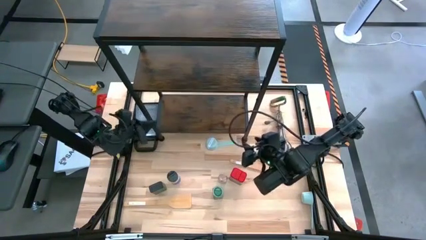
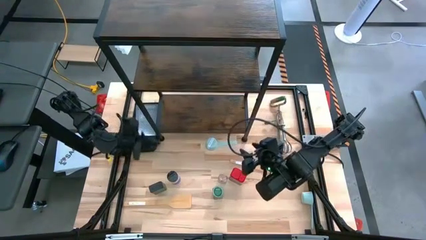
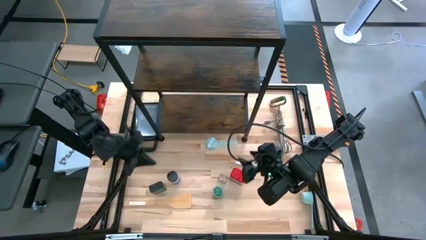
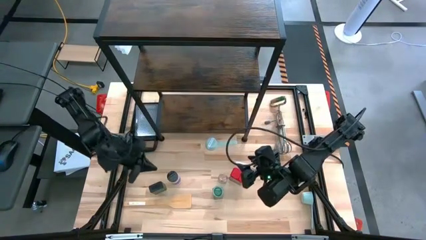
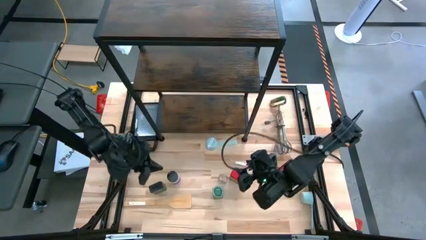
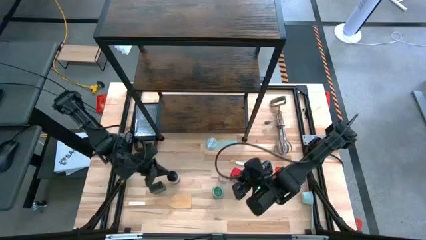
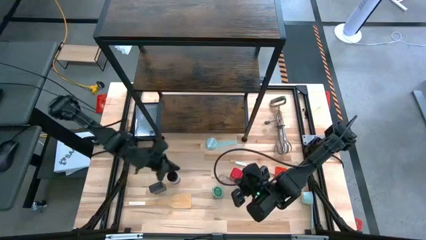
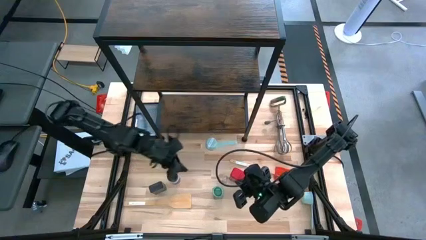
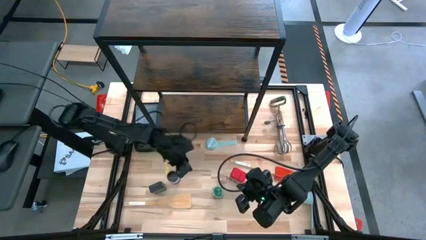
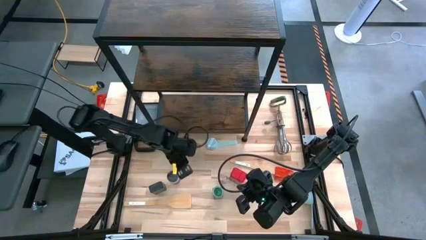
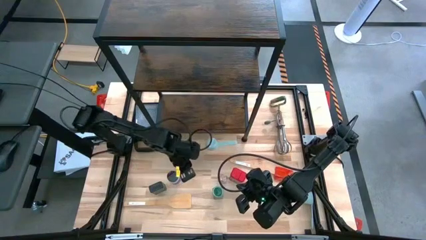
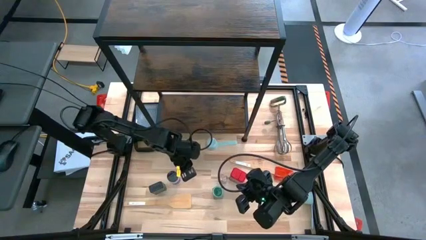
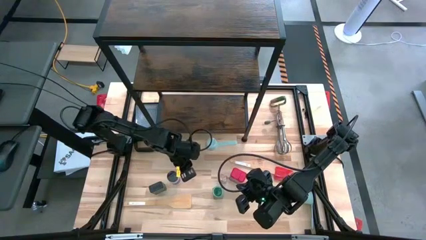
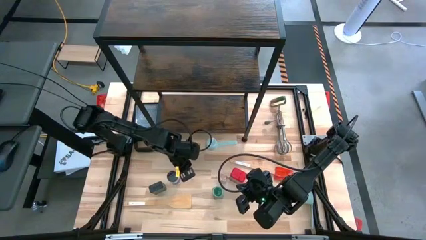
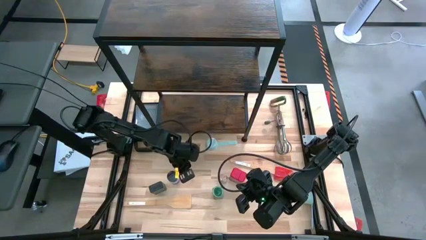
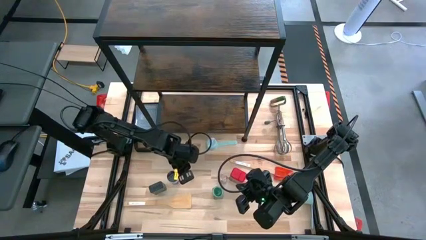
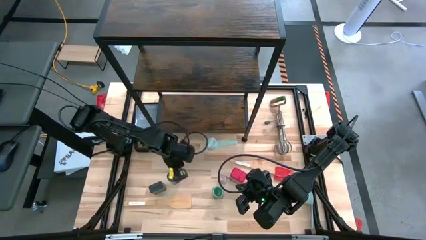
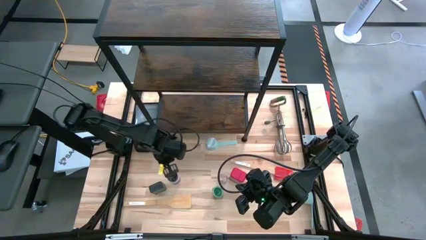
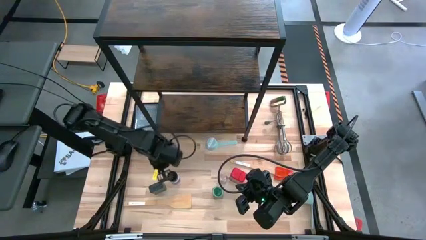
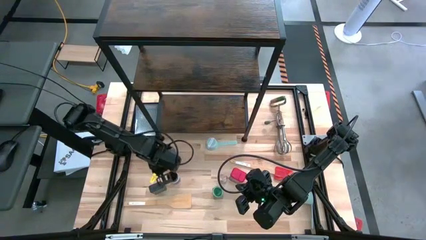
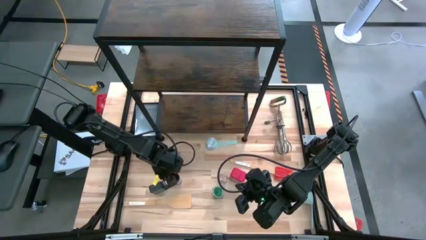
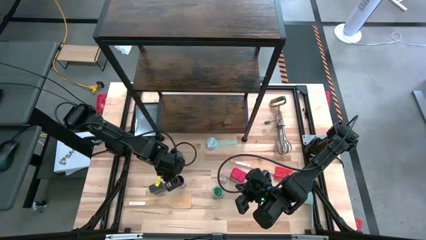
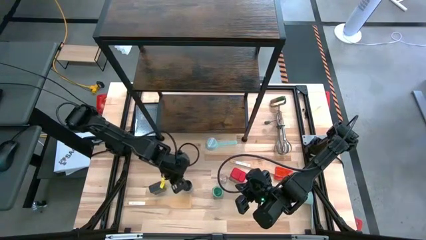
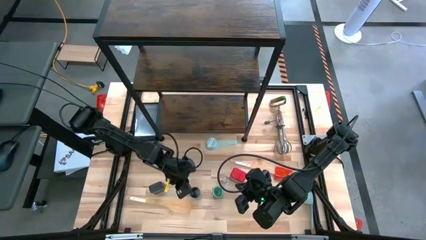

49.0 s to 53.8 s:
Task: Shelf spices
Move the purple seasoning bottle to the bottom center of the table

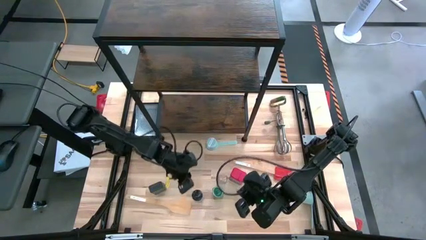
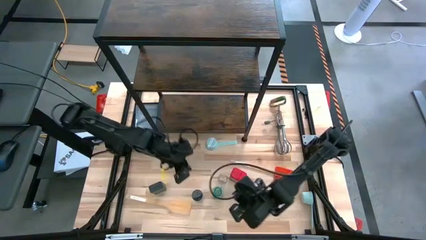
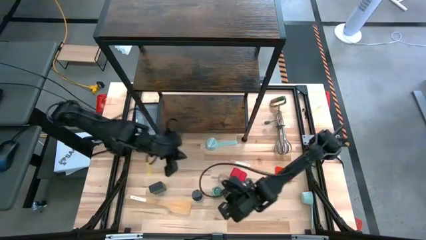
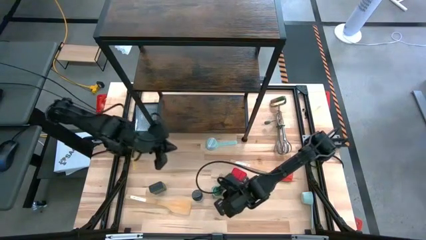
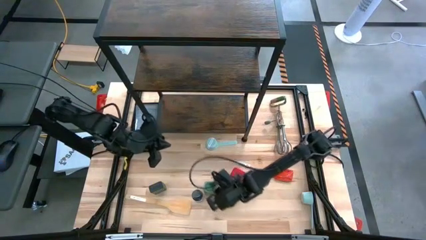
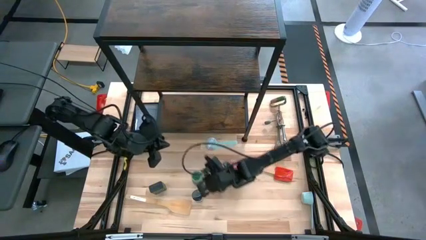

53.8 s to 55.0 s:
Move the green seasoning bottle to the center of the table

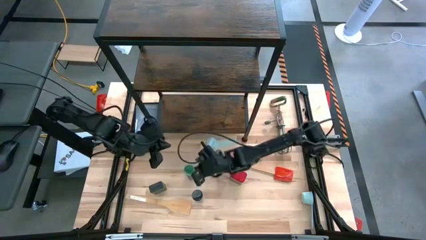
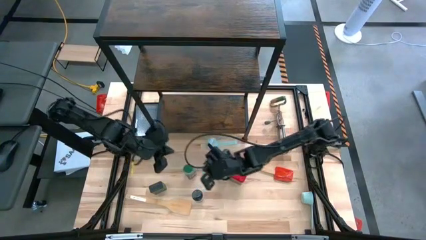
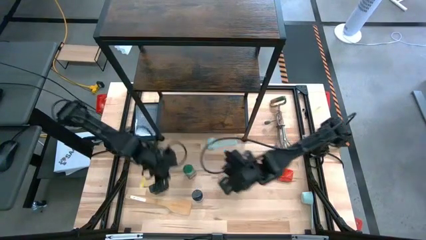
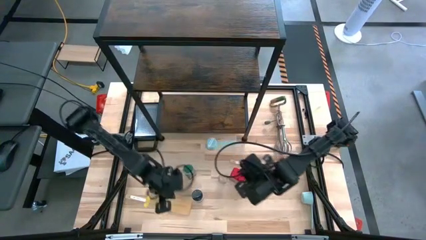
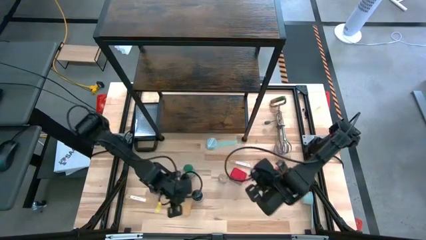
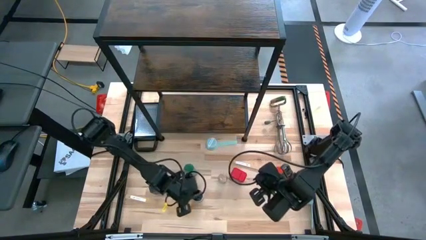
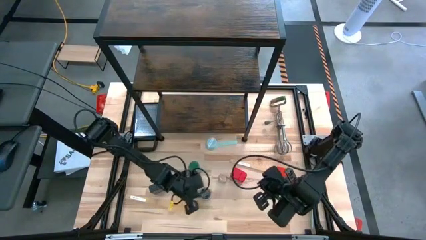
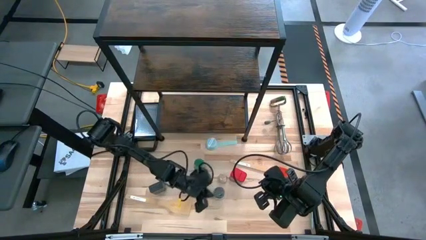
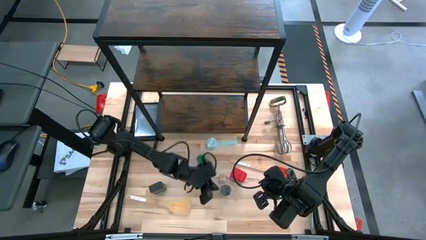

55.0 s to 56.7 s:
Adjust the purple seasoning bottle on the table

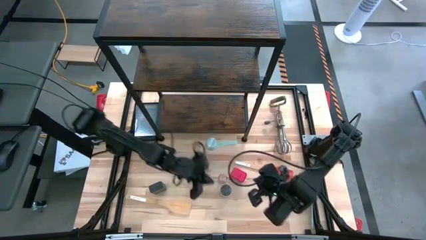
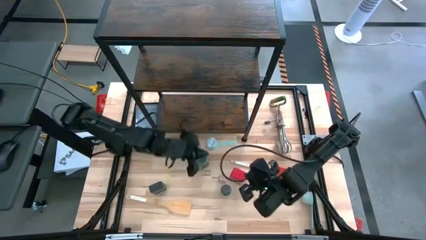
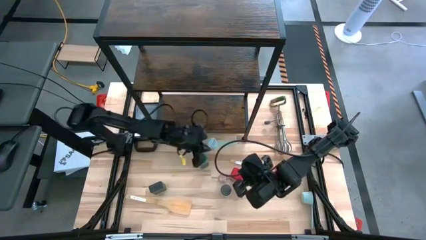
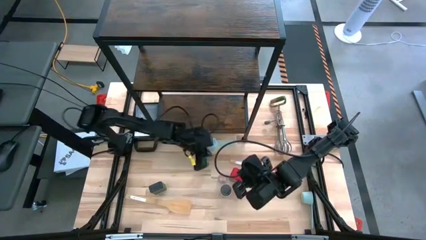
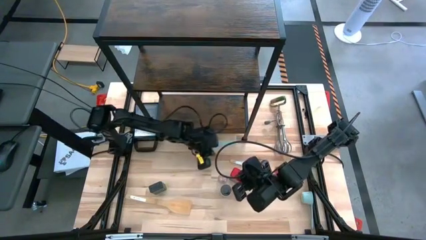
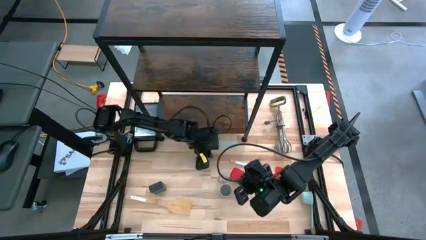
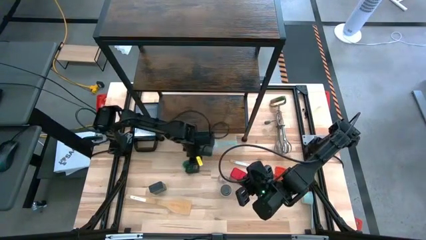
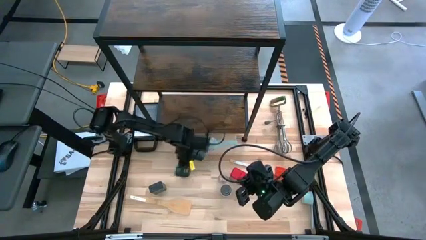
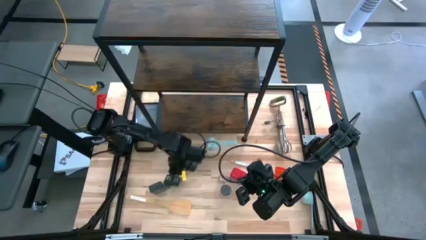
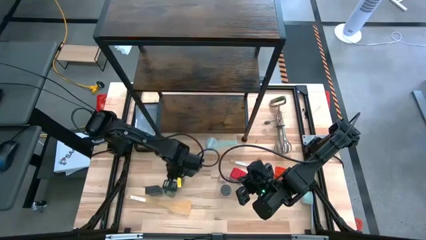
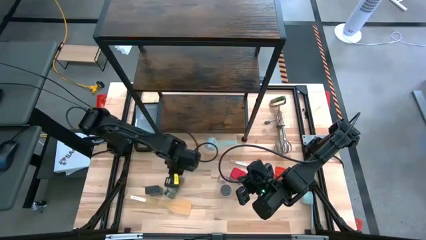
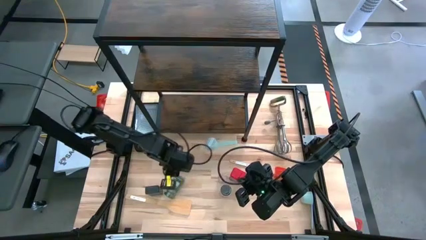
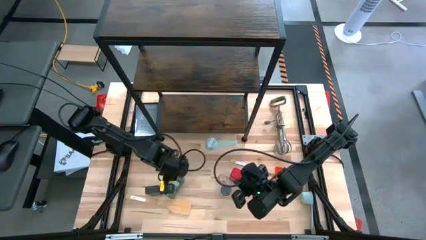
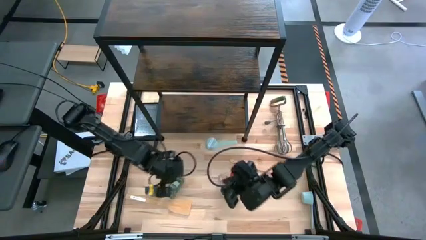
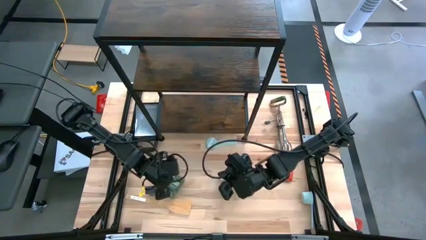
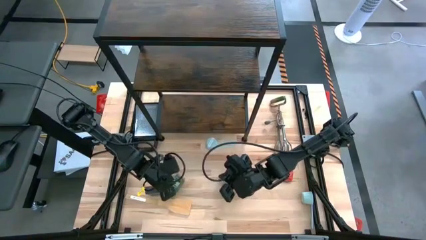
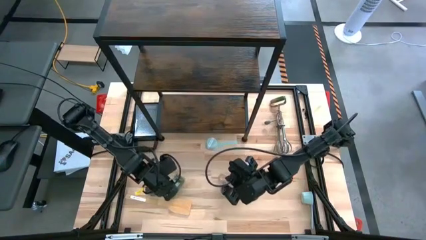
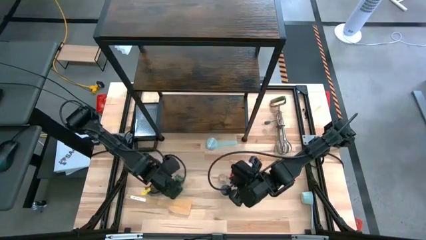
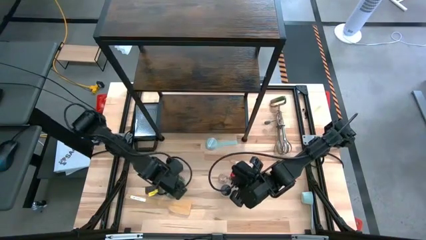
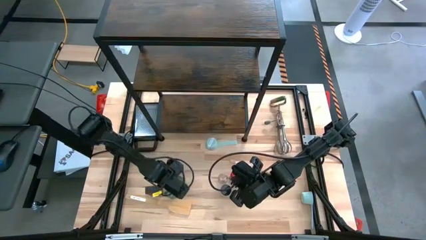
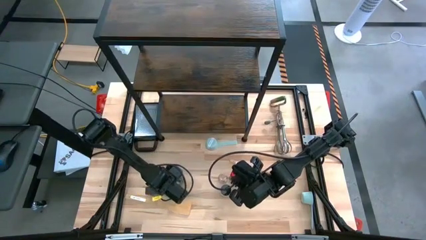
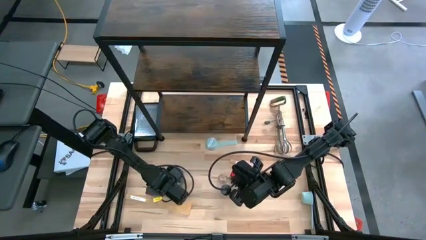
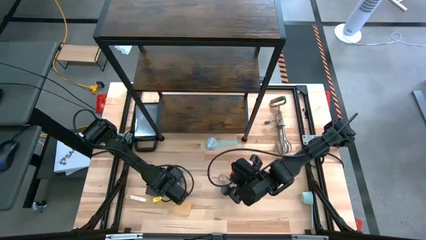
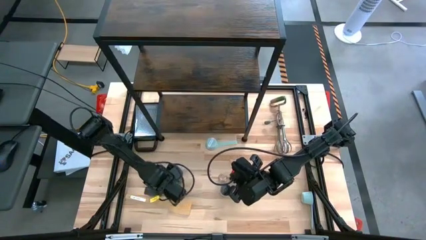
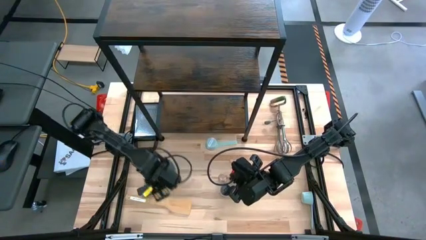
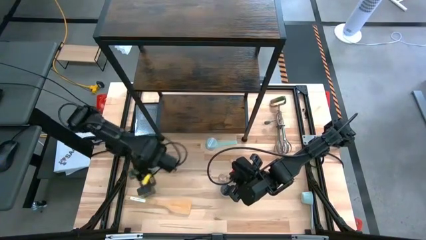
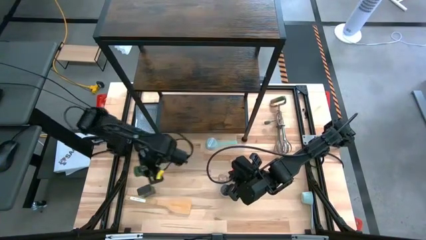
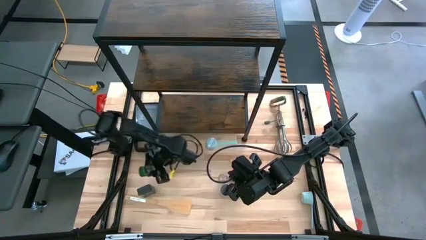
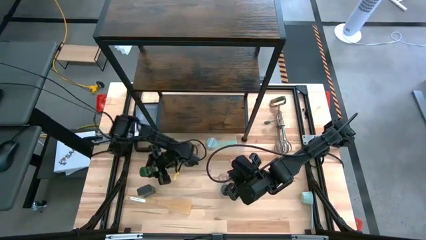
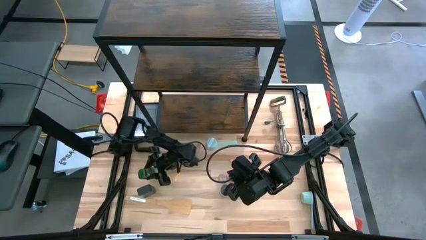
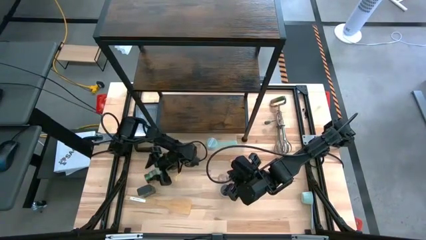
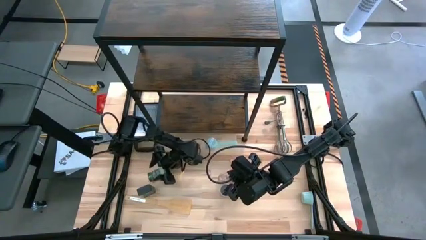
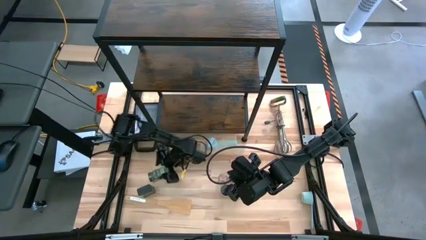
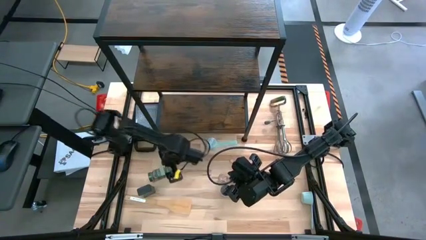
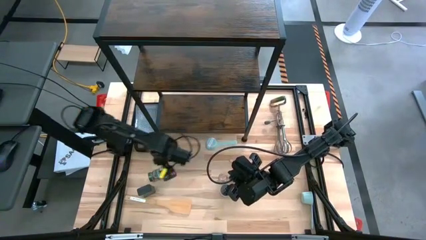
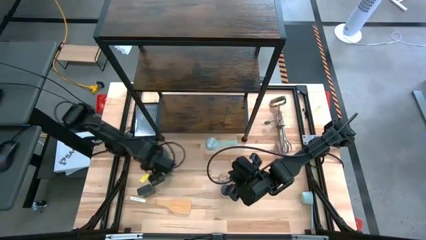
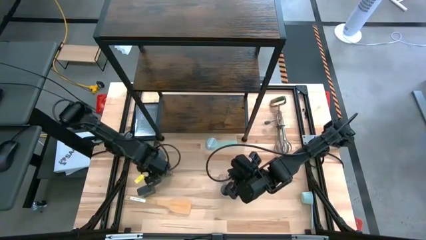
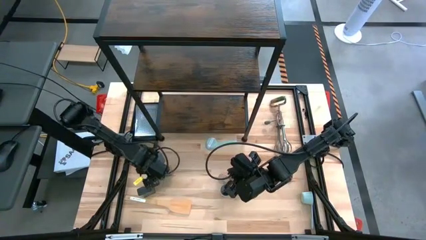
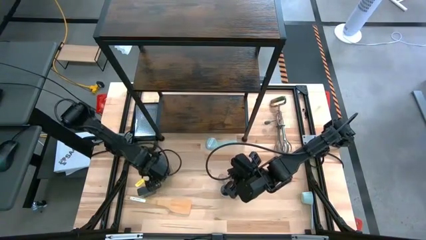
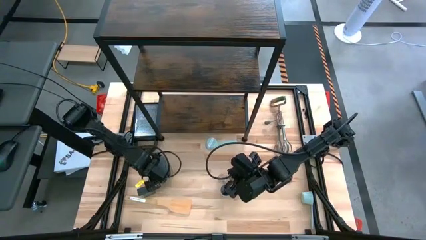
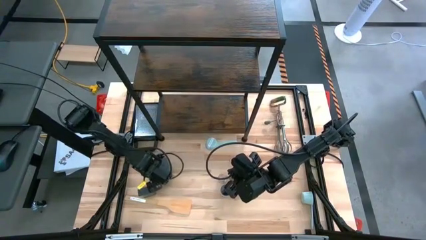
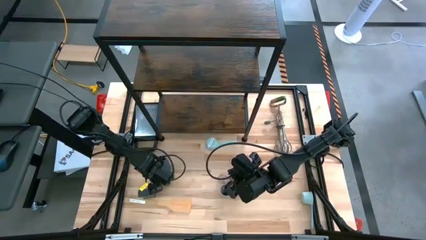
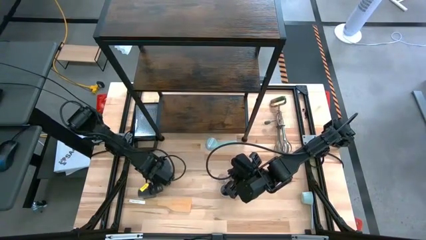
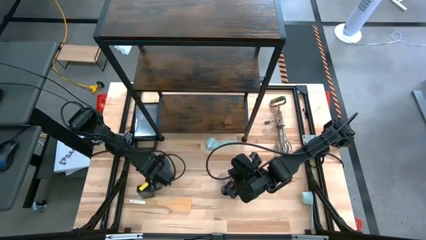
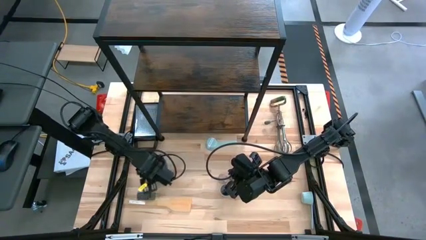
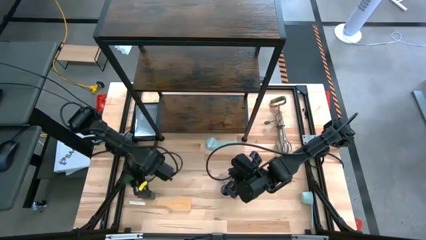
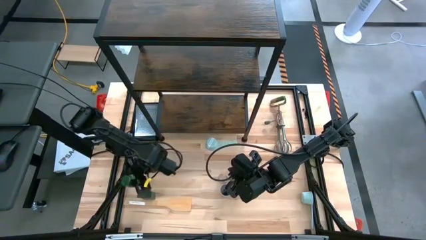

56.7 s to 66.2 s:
Adjust the green seasoning bottle on the table
